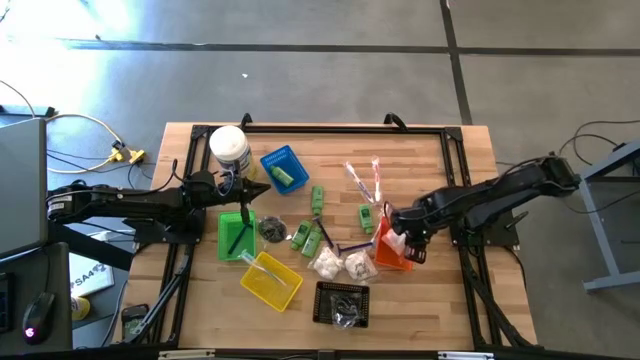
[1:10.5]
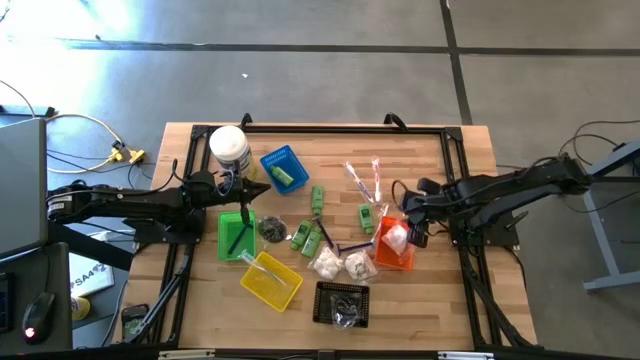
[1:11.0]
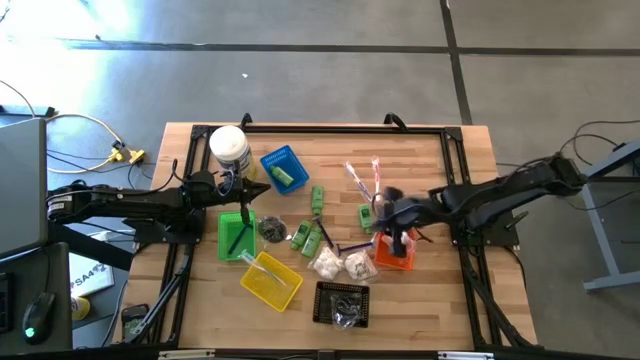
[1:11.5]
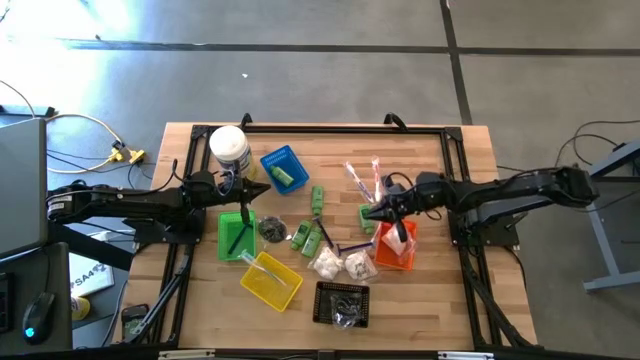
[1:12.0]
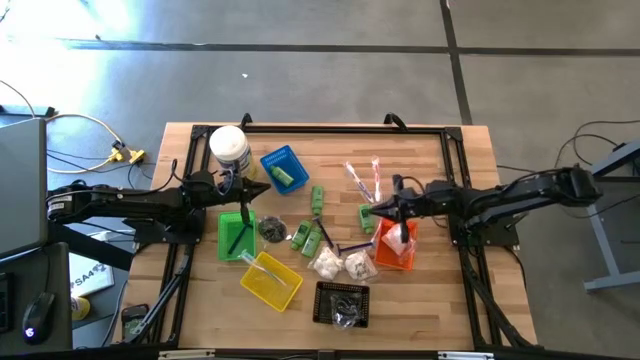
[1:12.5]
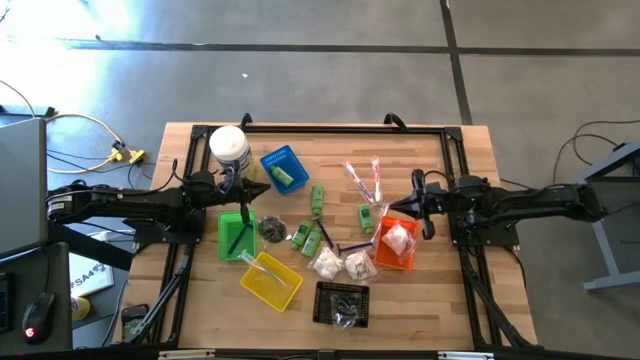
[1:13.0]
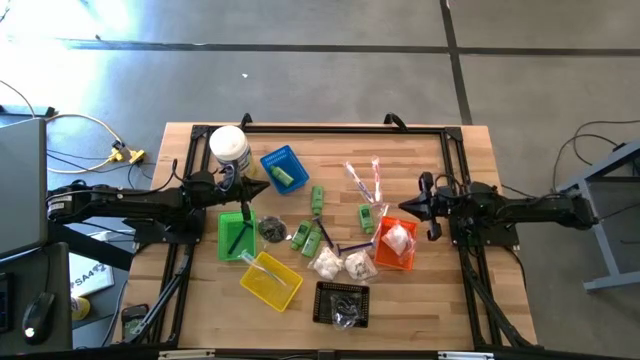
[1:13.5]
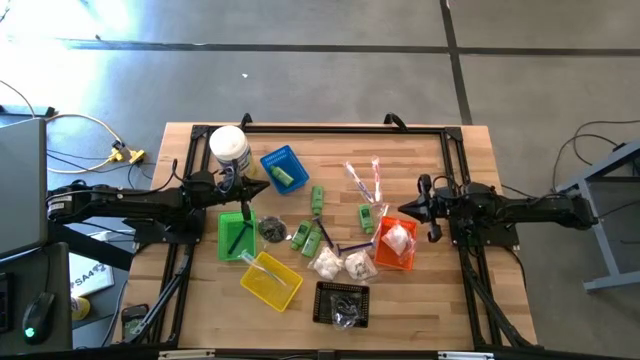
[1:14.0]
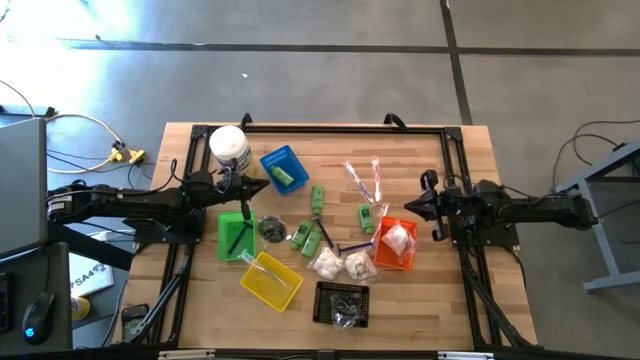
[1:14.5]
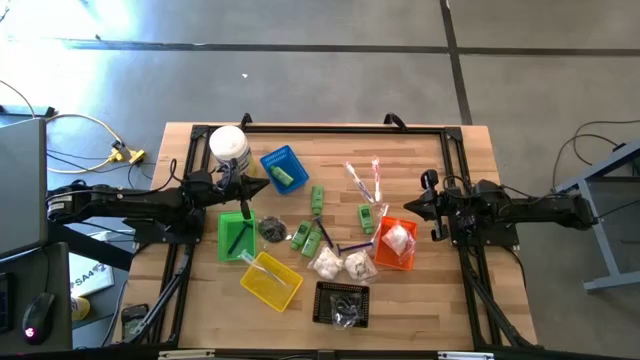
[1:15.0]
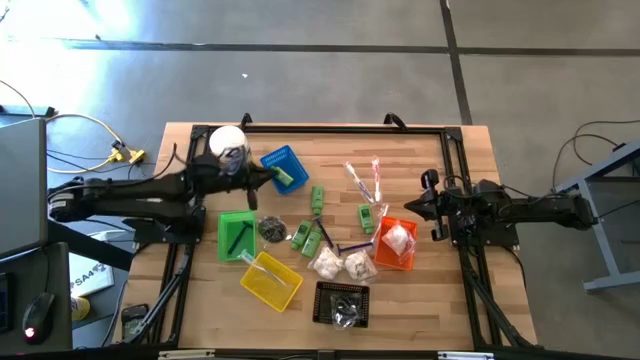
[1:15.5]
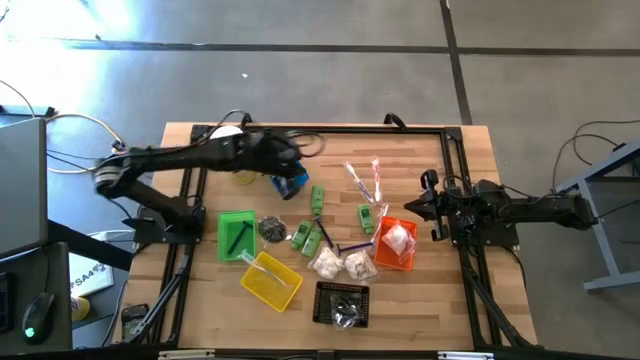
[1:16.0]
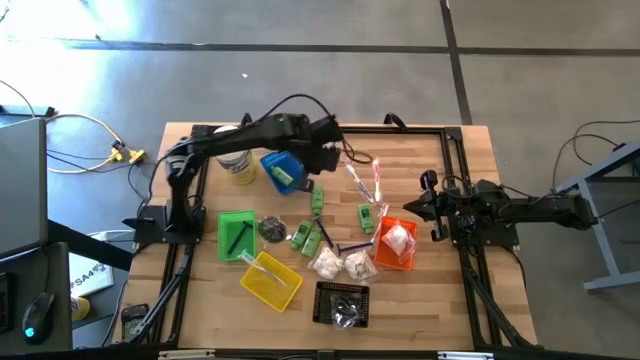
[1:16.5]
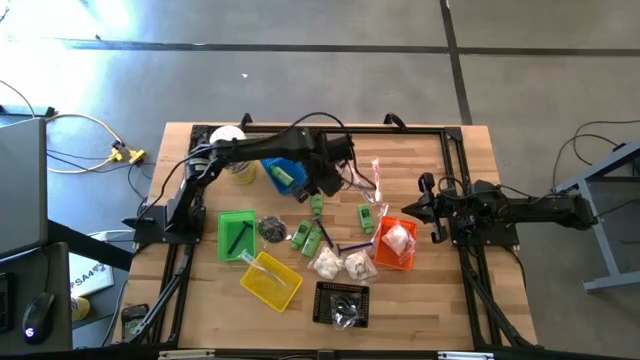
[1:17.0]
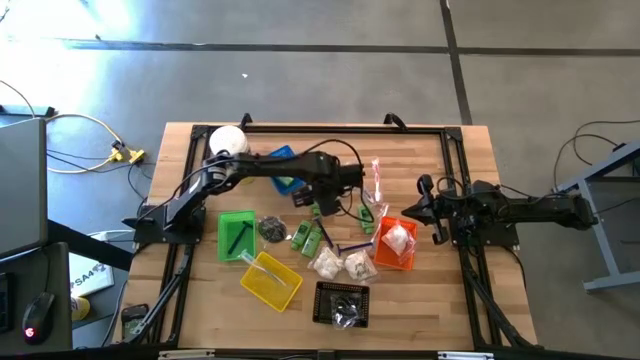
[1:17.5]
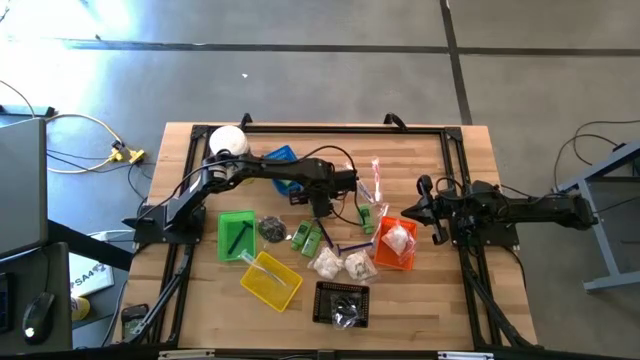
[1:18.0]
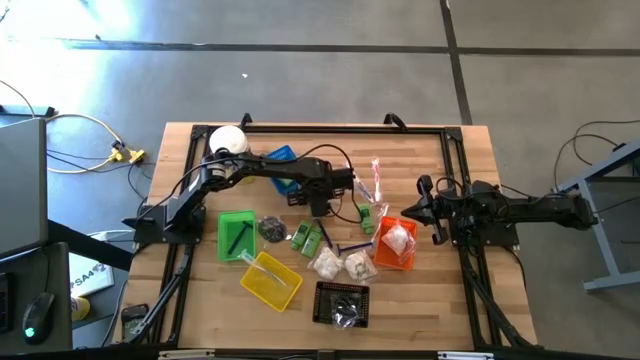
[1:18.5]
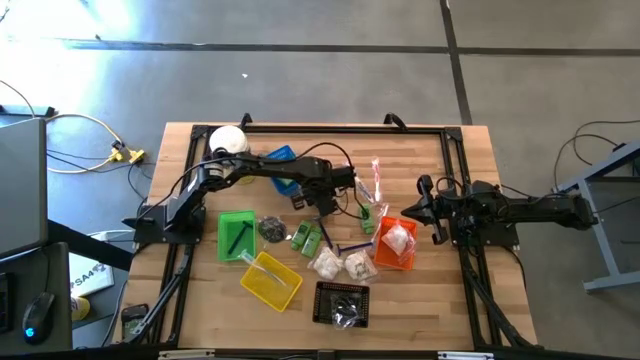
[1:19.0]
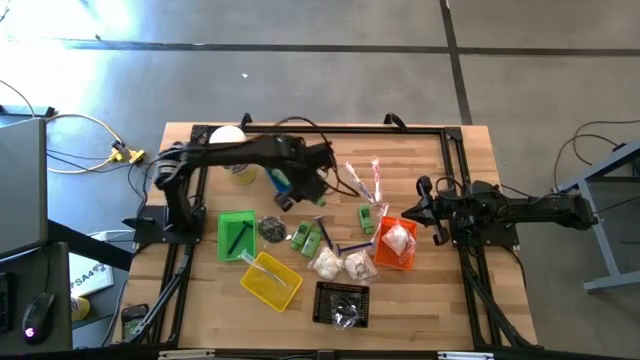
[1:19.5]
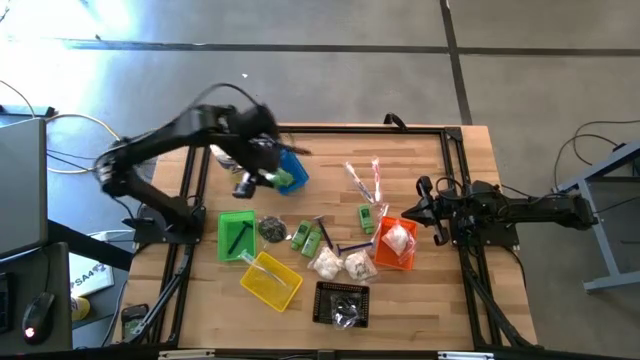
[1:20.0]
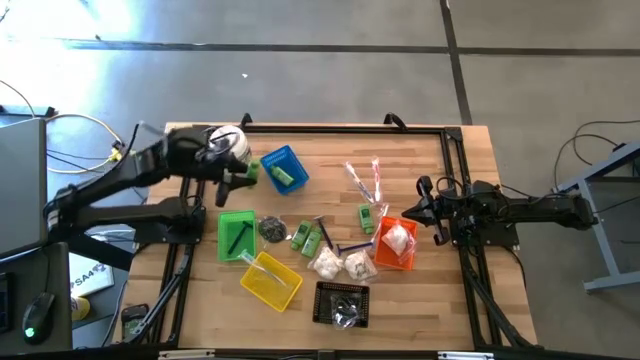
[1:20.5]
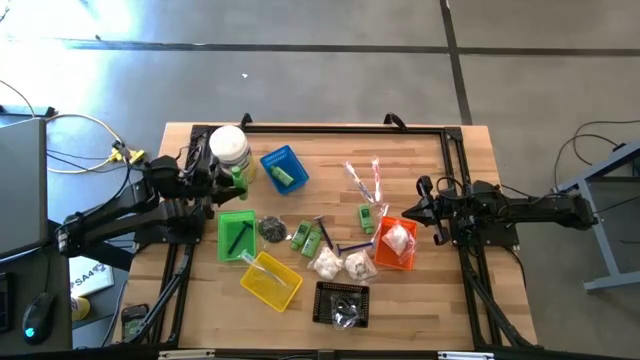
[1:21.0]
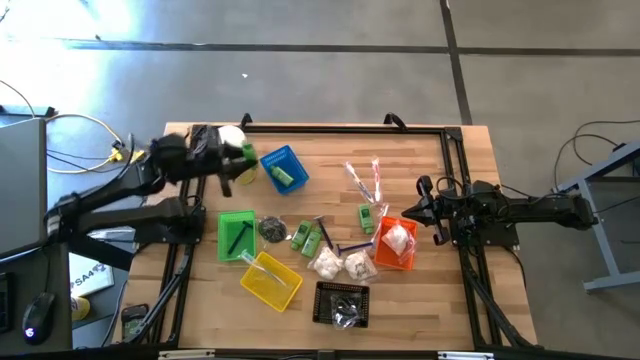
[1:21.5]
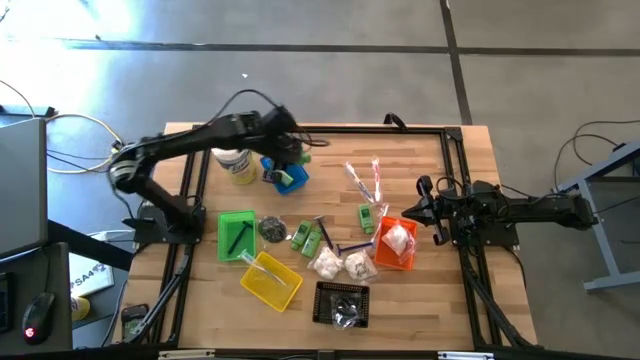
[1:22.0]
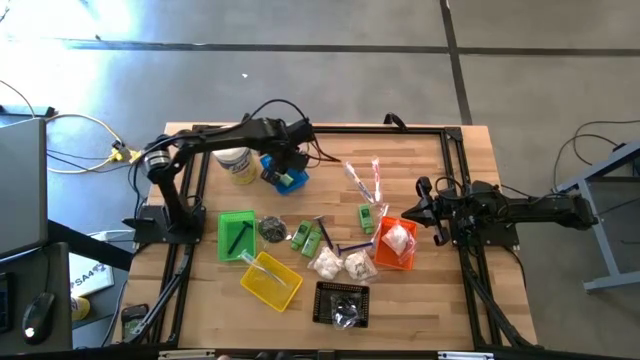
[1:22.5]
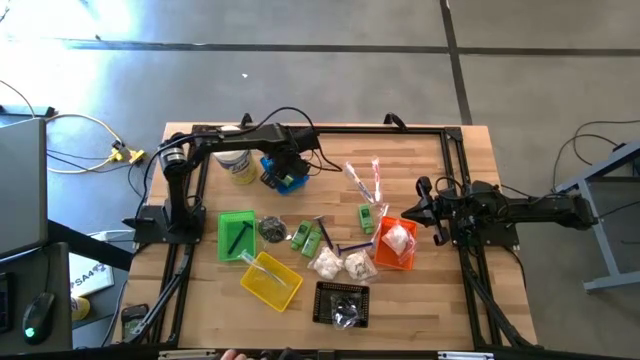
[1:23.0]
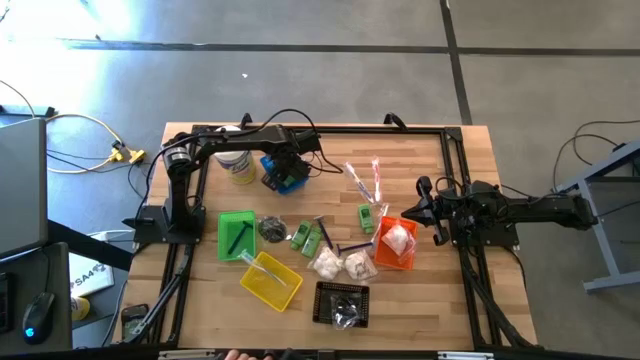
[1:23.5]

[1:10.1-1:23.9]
Task: Pick & Place Travel size toiletries
Put the green shampoo into the blue bin

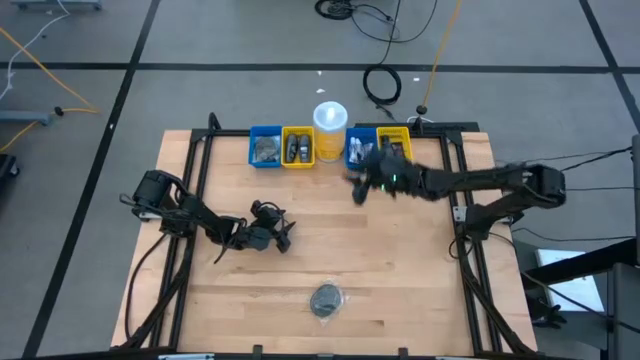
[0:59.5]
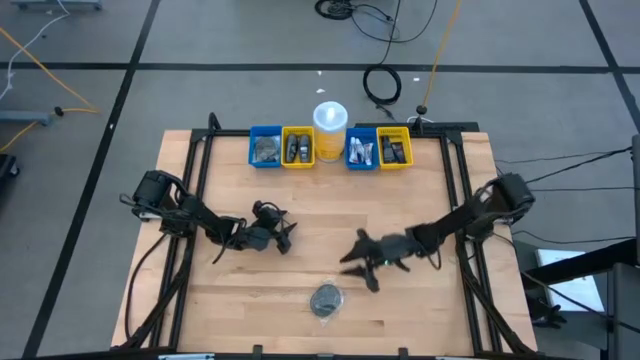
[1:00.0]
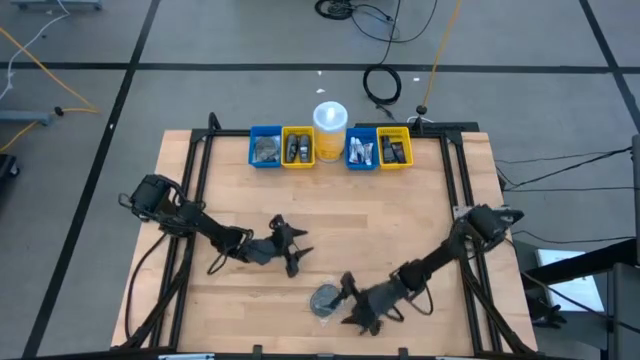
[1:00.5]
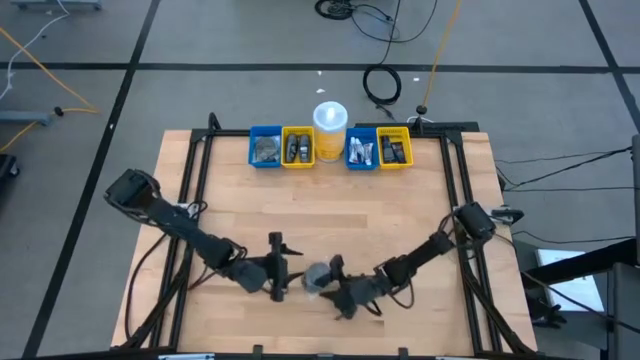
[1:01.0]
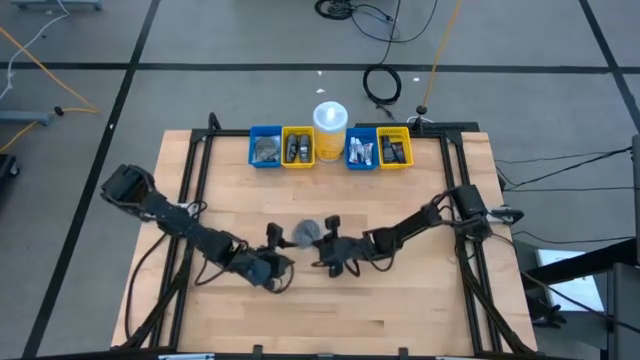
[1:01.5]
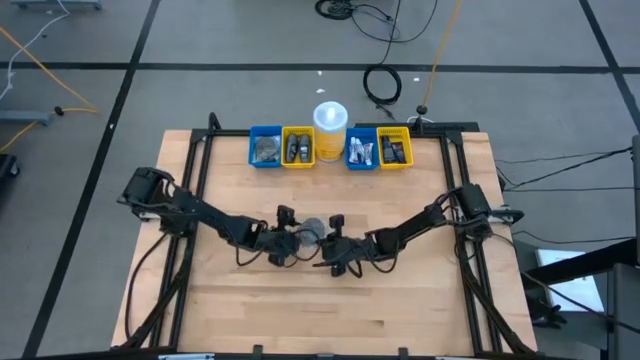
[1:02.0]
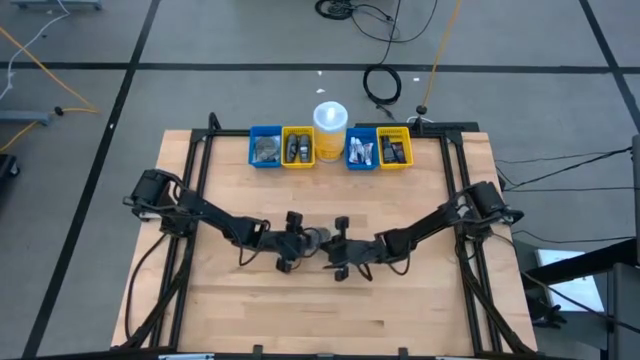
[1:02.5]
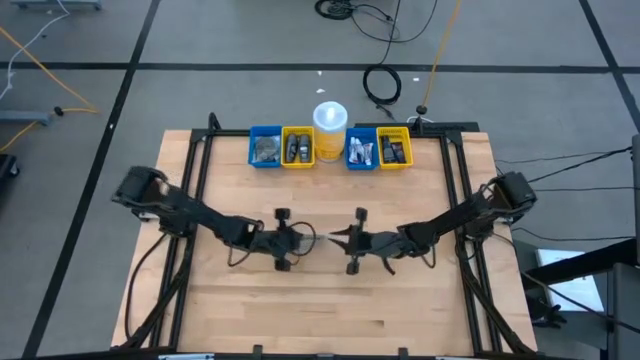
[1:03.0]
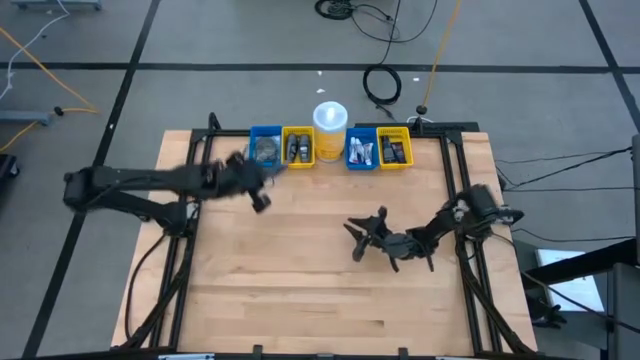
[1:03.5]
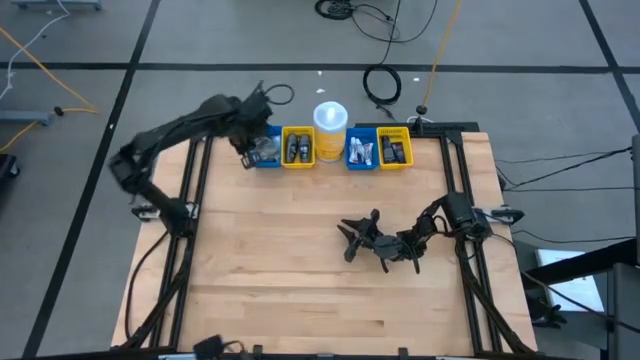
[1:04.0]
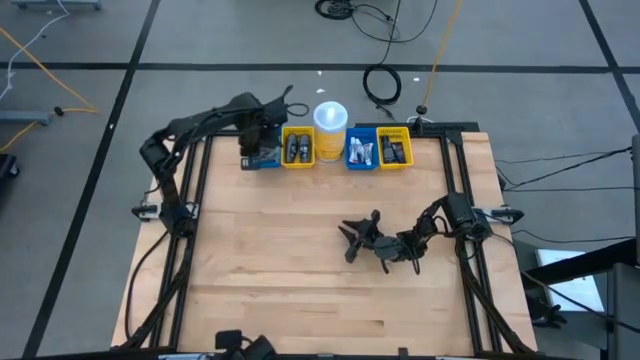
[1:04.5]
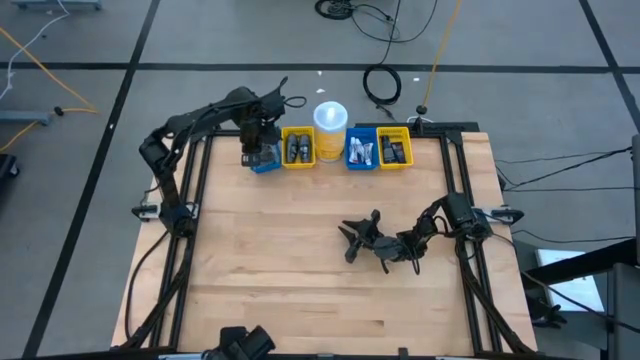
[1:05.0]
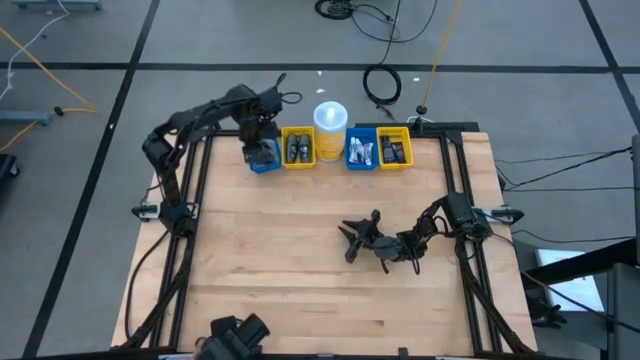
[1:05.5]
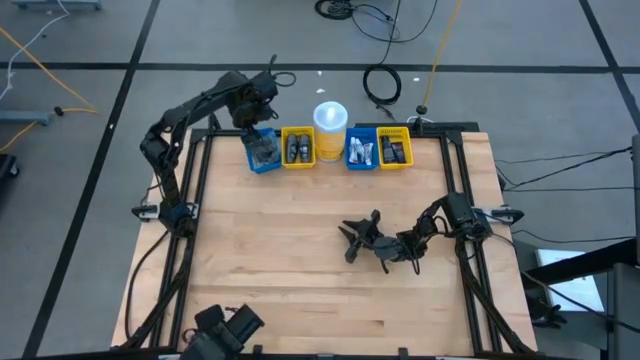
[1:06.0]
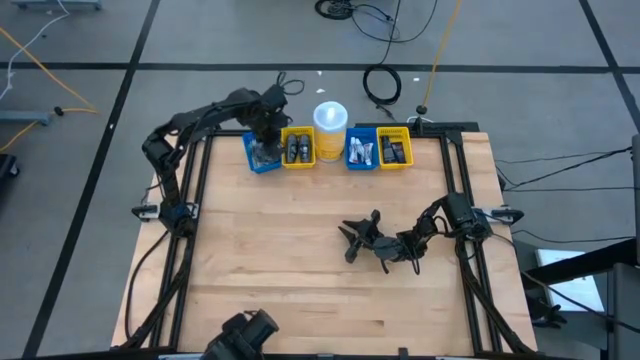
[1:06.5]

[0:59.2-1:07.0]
Task: Pick & Place Travel size toiletries
Put the black hairbrush into the left blue bin

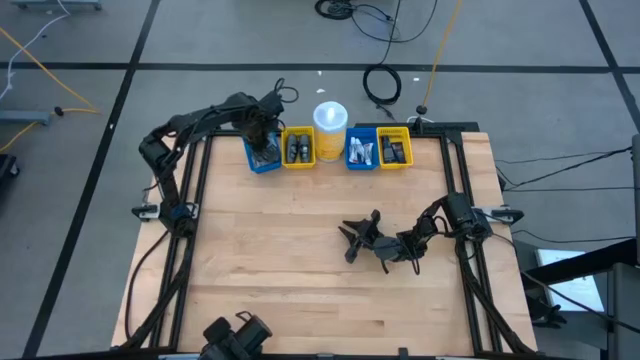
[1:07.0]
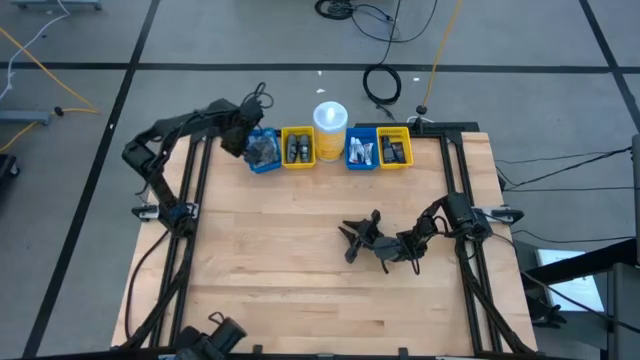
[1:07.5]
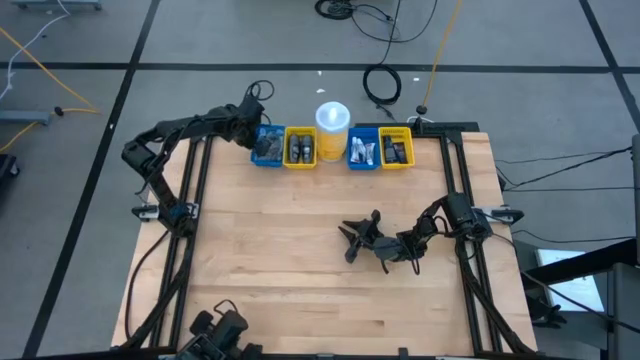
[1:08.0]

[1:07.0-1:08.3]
Adjust the left blue bin
